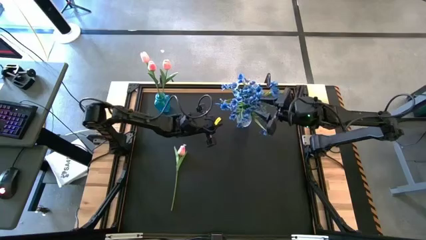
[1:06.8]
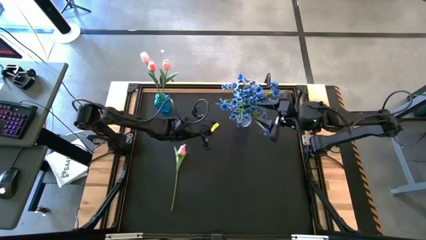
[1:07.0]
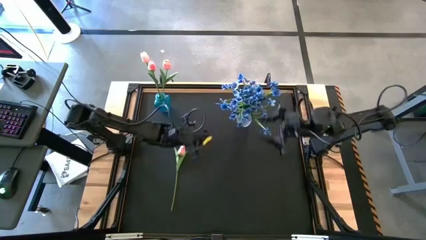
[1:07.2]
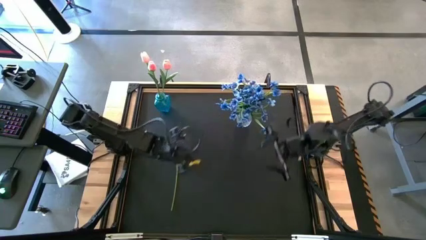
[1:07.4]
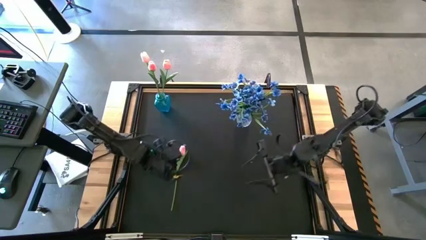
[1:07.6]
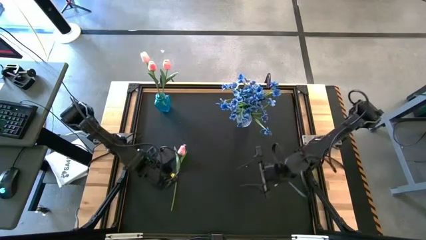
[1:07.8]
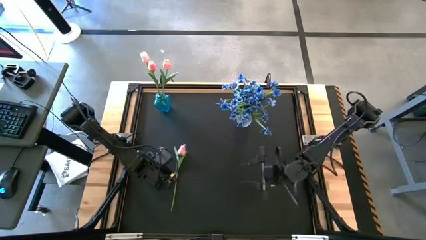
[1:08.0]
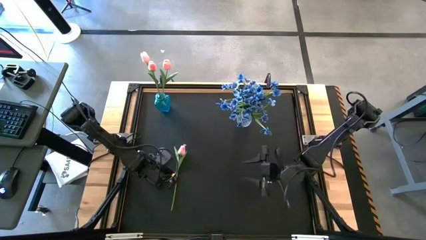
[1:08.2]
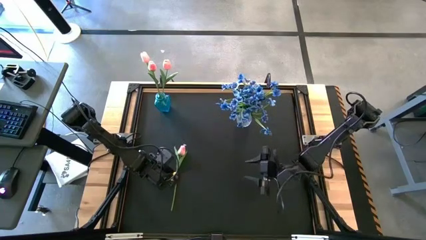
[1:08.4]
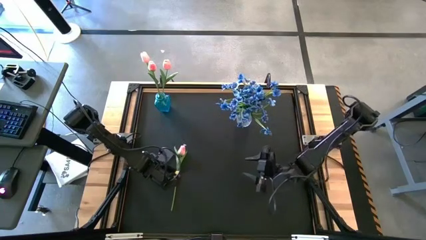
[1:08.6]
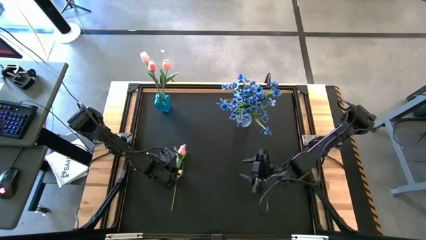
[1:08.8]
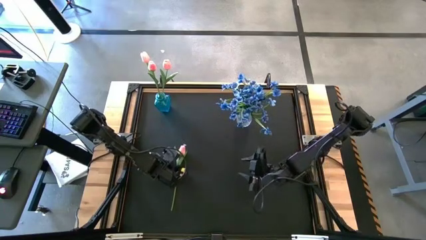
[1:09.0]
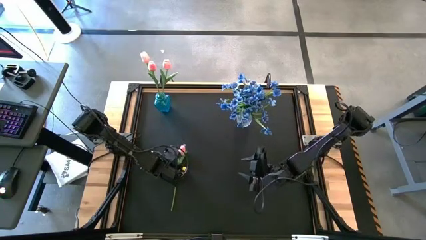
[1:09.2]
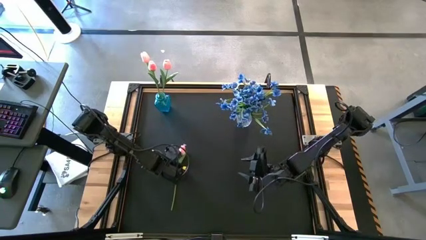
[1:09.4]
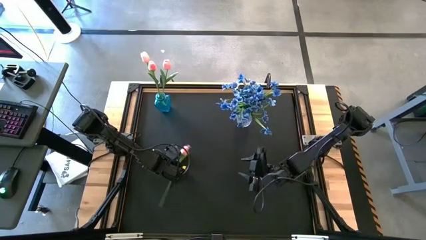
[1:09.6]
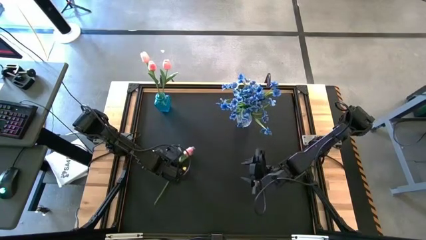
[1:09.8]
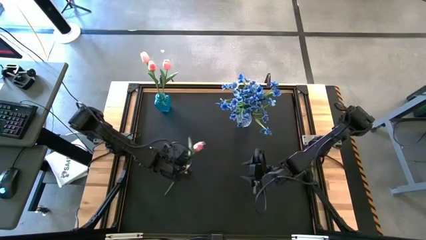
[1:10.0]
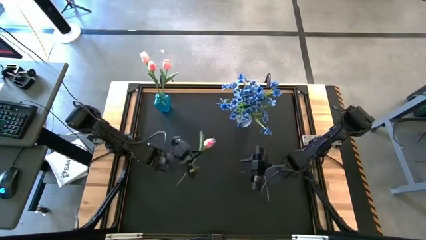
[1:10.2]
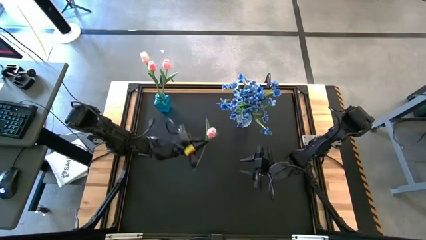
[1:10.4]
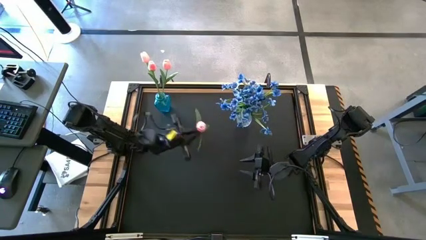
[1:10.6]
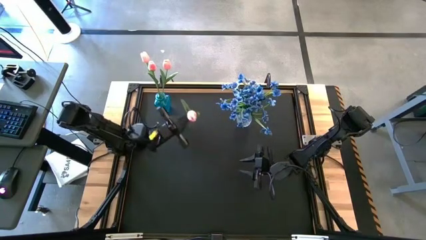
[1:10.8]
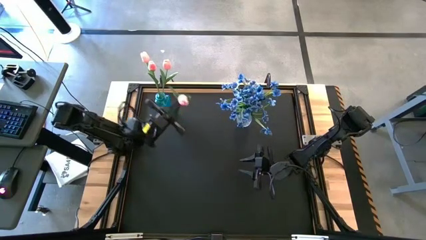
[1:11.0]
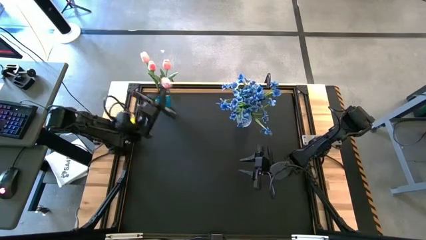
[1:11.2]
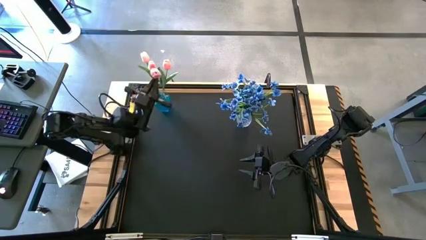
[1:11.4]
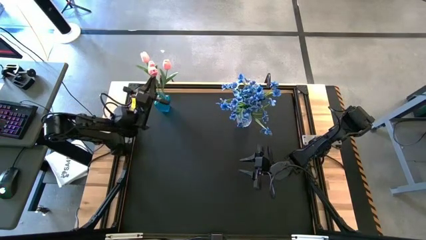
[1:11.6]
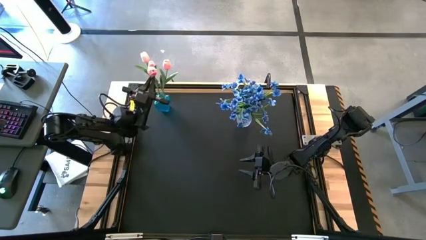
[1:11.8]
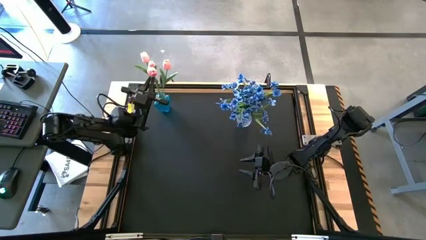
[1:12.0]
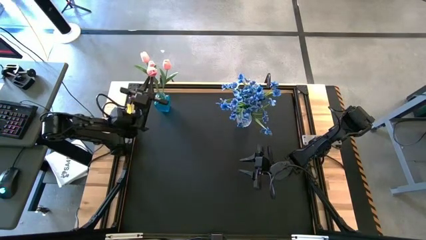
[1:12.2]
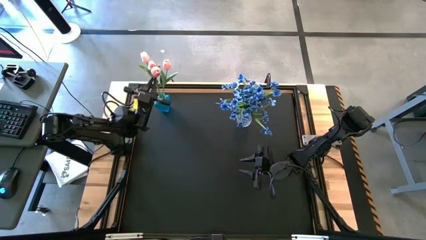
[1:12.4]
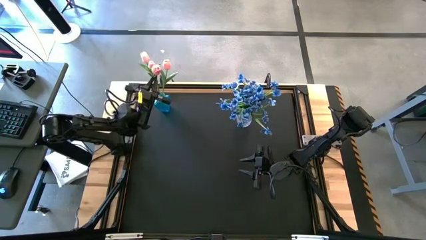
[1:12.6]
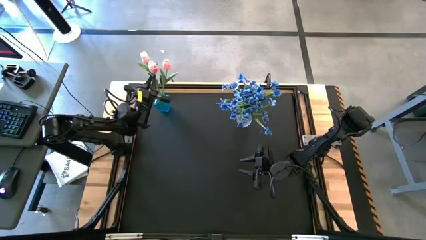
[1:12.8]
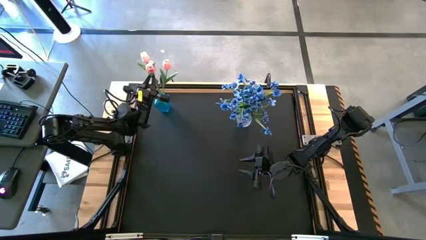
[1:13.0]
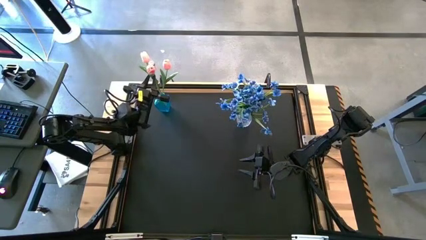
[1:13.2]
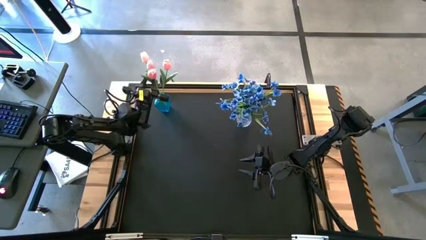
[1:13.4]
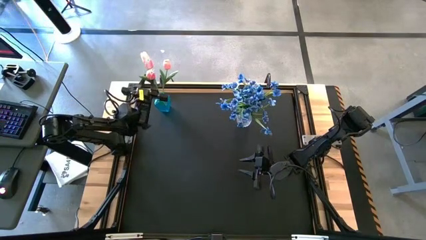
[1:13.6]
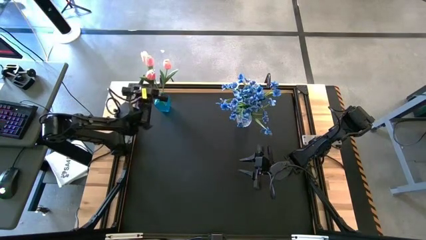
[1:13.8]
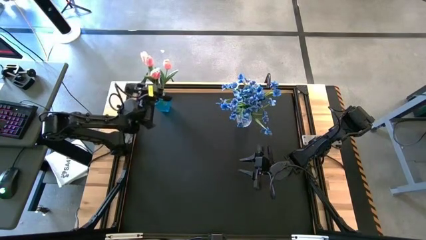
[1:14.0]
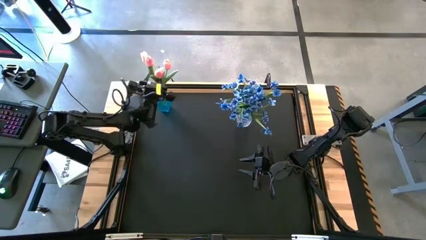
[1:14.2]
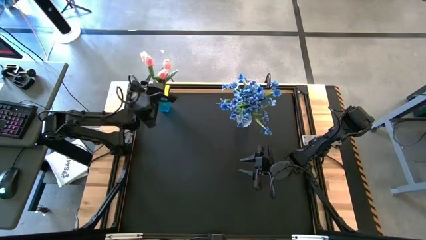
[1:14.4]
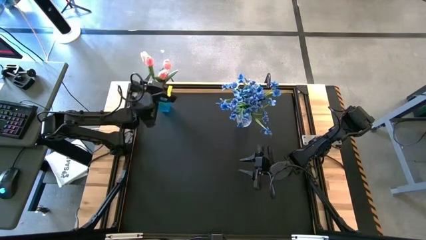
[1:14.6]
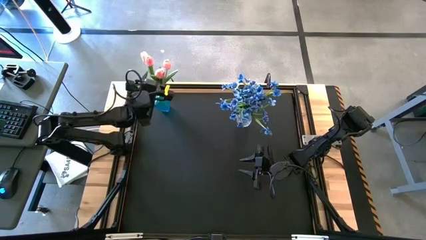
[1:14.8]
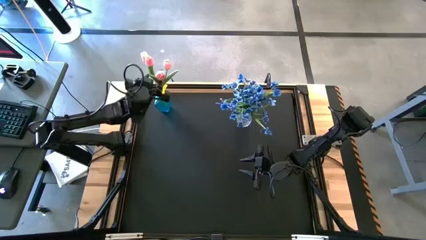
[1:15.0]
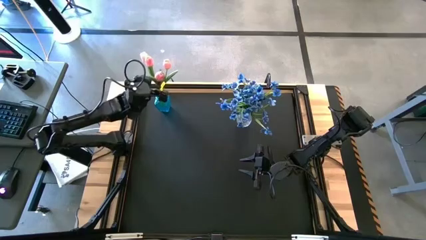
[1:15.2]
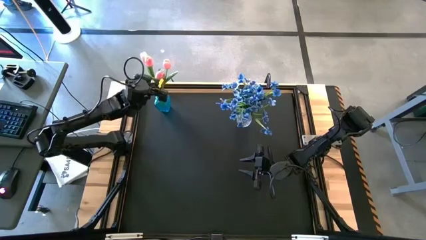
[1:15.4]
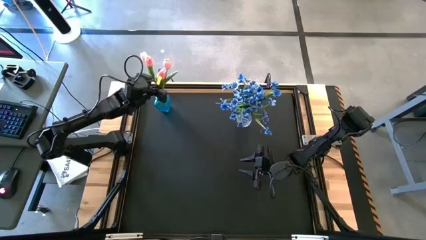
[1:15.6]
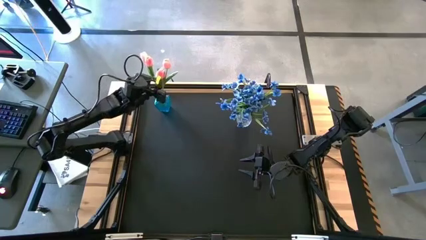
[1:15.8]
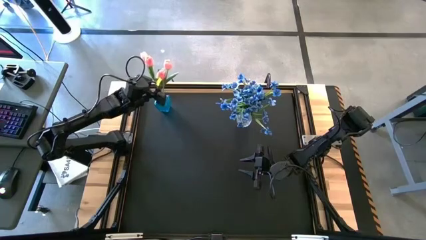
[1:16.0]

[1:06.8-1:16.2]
Task: Sort flowers into vase by color
Put the pink flower into the blue vase

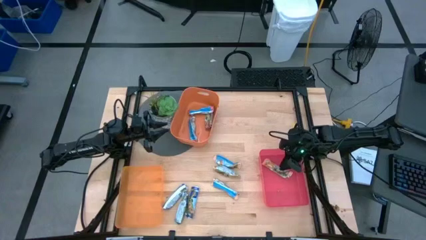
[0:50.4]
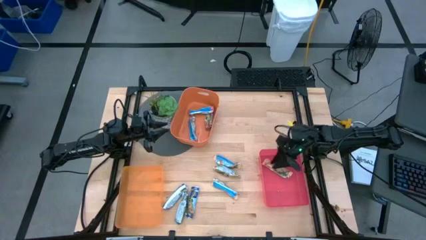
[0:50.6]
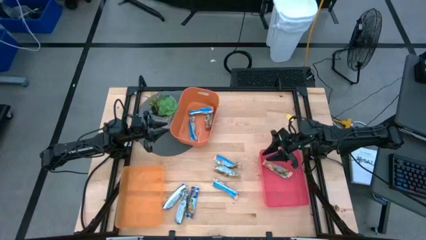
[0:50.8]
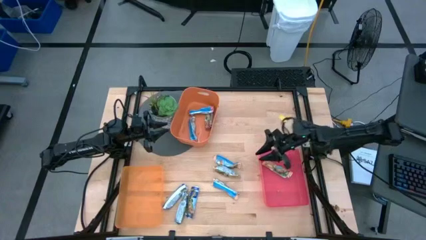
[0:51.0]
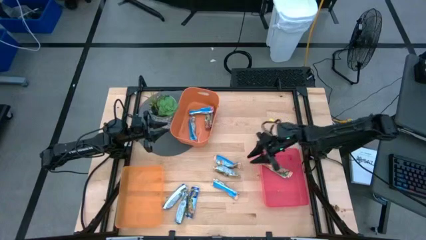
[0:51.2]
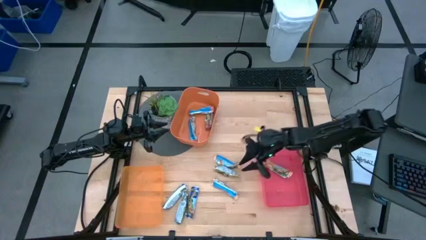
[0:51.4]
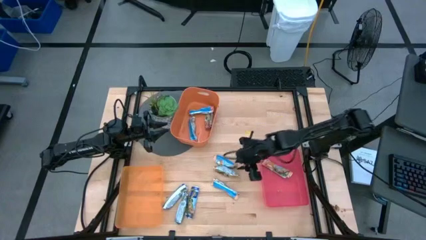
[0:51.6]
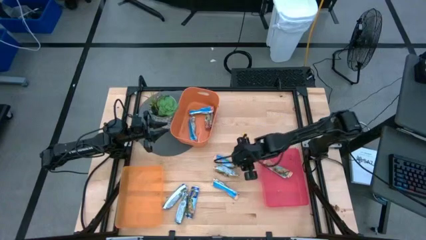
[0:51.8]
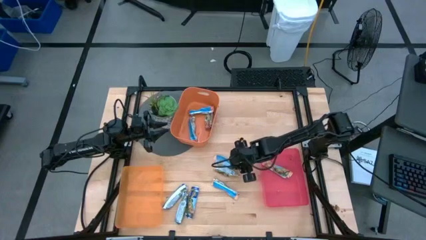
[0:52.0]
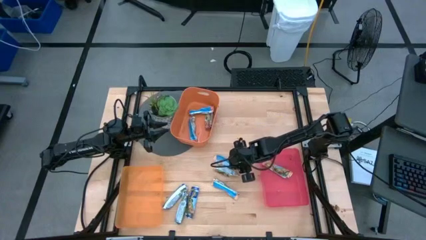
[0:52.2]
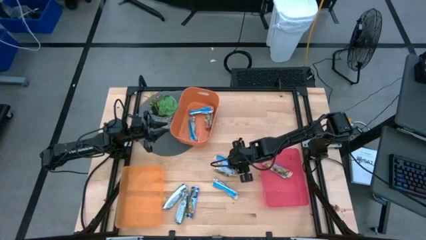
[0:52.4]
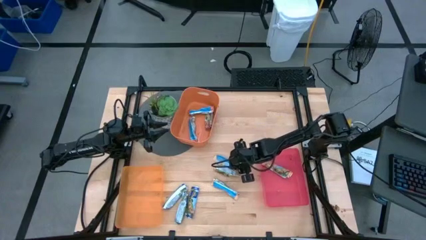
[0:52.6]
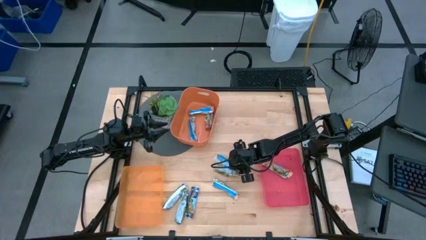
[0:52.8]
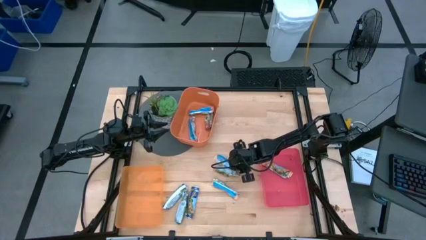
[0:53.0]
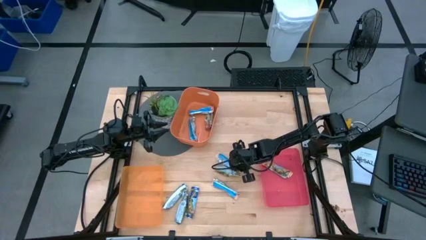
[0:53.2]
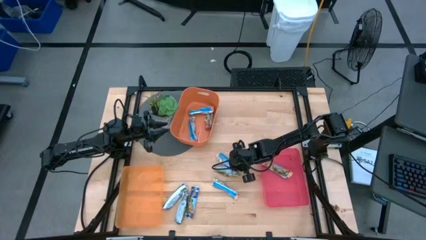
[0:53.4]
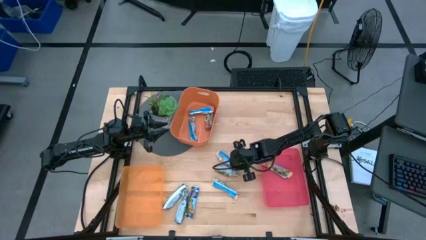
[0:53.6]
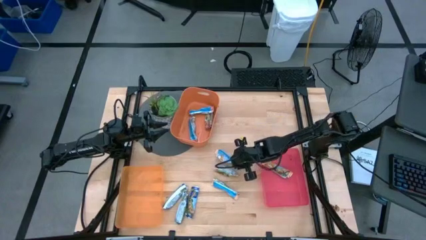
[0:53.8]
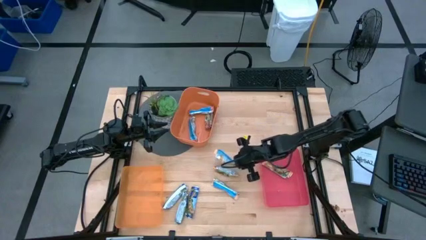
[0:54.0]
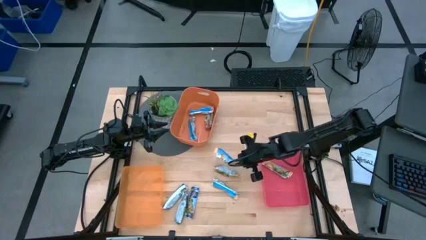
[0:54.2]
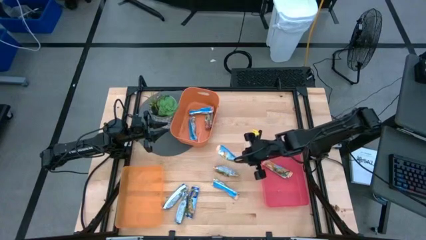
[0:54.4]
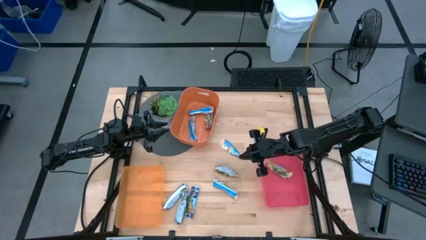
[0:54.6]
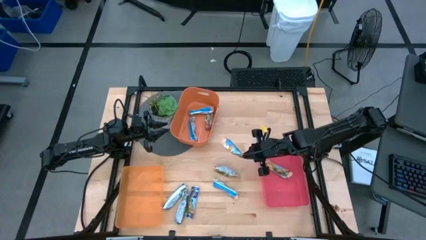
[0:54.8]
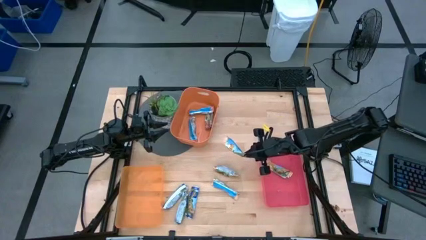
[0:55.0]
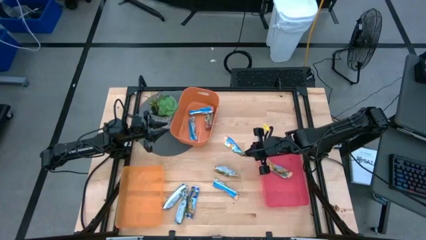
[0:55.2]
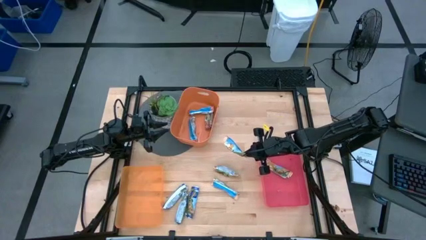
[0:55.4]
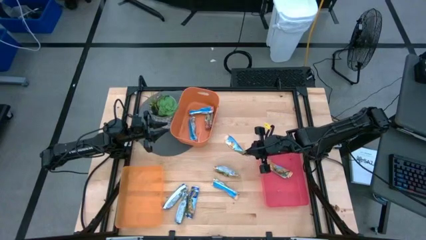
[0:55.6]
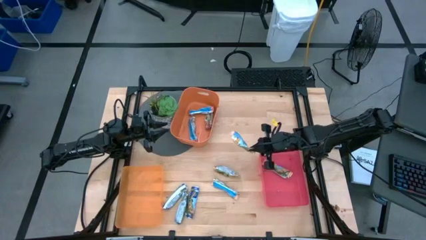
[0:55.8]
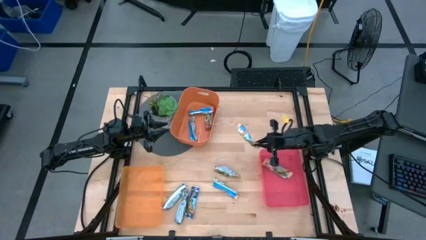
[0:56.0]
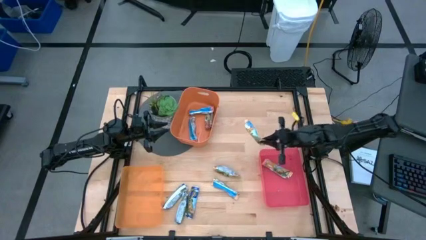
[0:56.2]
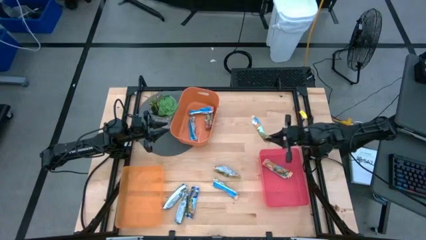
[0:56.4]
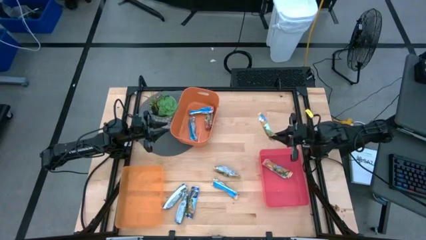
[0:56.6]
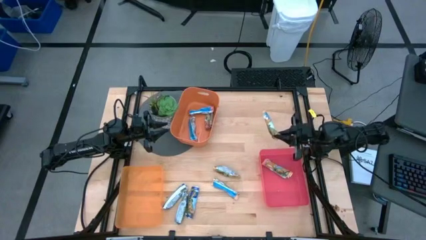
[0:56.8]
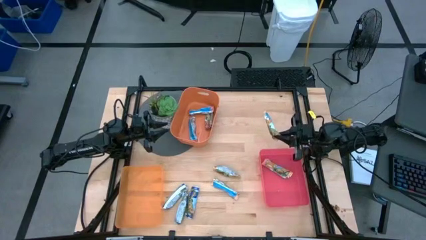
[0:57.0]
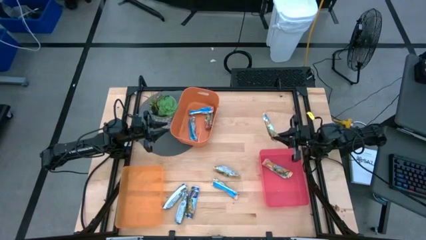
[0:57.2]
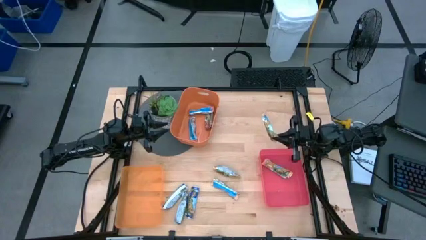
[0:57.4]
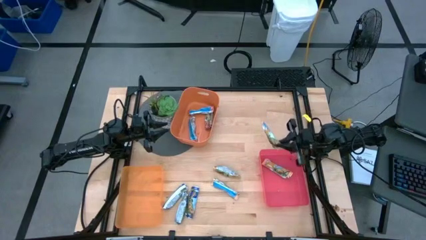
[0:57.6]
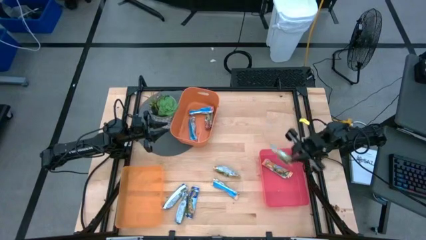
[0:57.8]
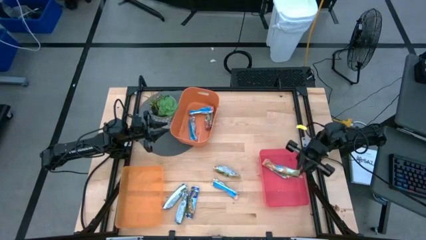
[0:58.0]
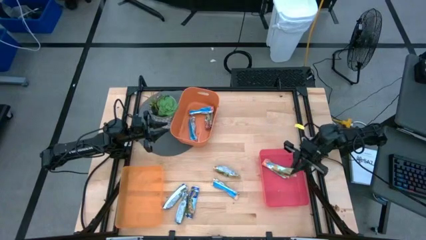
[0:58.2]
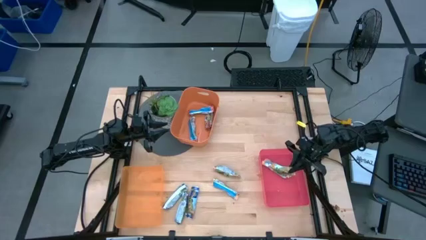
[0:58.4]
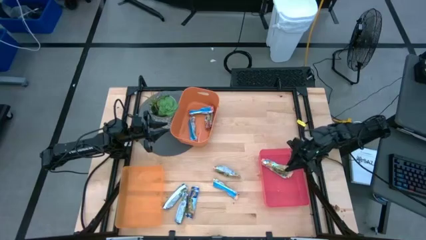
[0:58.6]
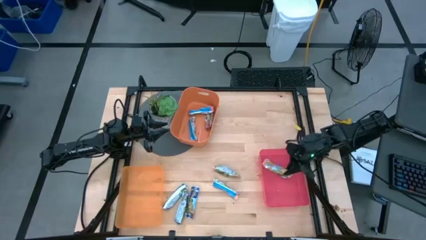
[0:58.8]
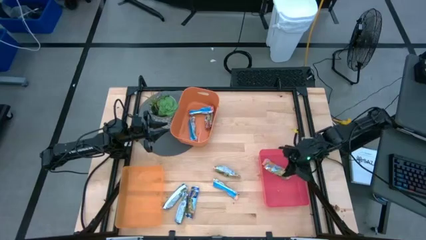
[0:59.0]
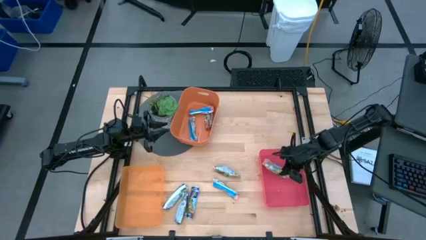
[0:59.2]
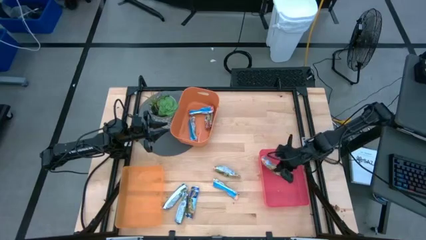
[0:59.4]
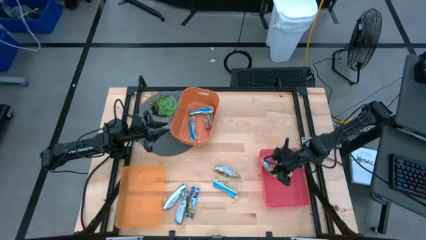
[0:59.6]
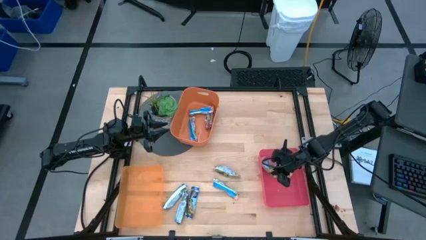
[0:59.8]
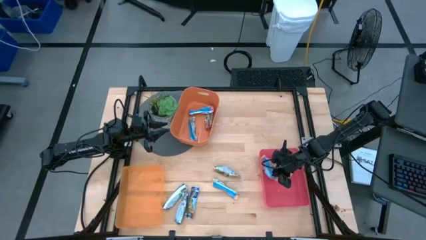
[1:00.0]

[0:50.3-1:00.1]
Task: Pick and place Granola Bars by type
Put the yellow granola bar into the red bin
